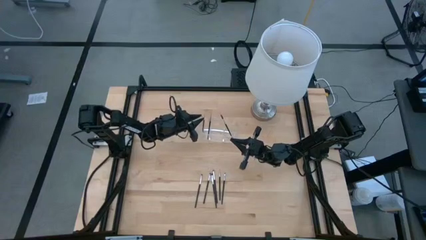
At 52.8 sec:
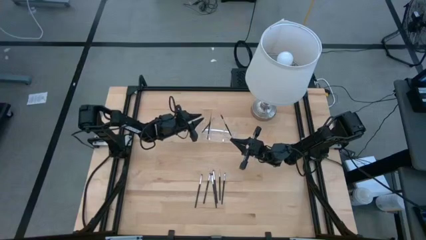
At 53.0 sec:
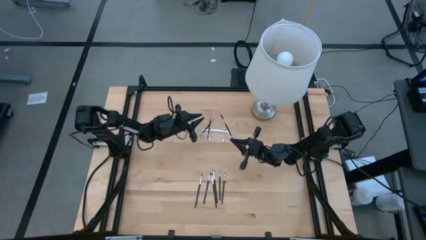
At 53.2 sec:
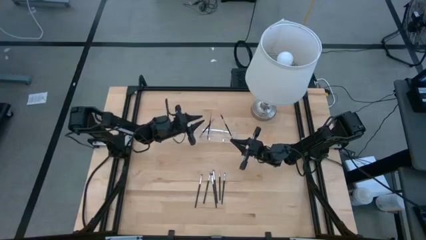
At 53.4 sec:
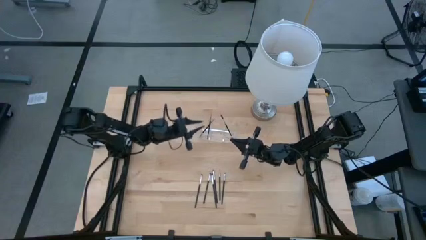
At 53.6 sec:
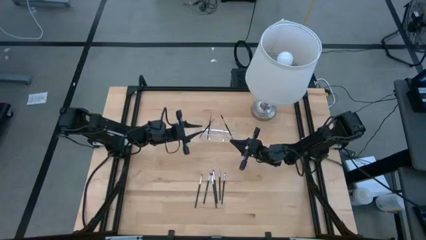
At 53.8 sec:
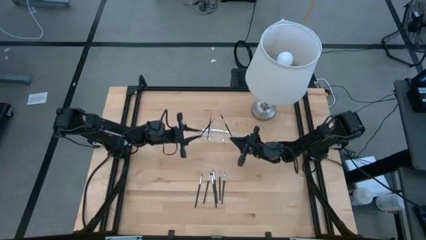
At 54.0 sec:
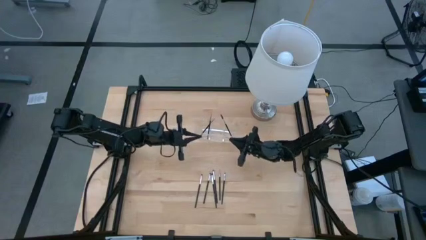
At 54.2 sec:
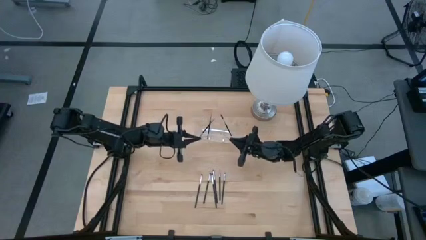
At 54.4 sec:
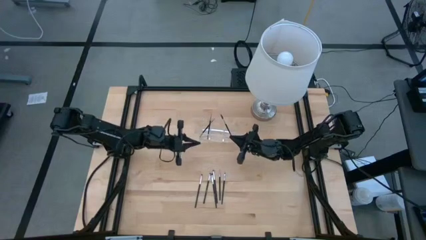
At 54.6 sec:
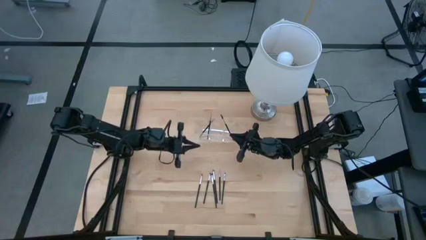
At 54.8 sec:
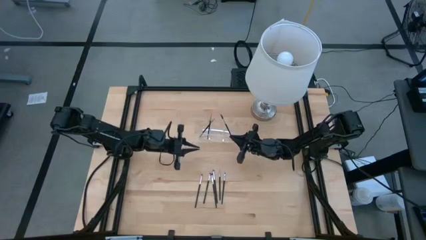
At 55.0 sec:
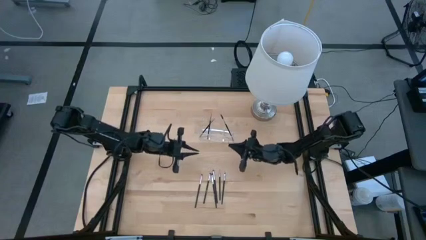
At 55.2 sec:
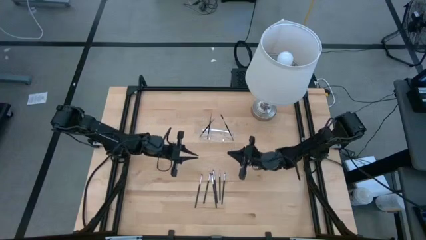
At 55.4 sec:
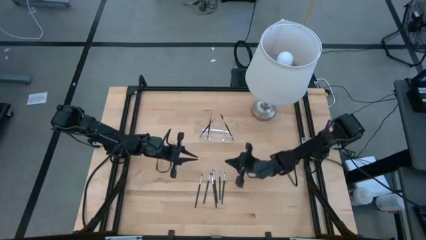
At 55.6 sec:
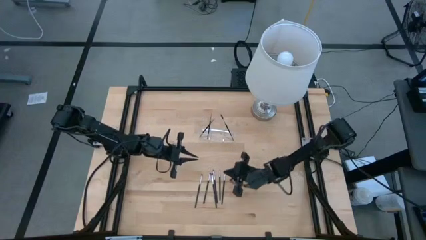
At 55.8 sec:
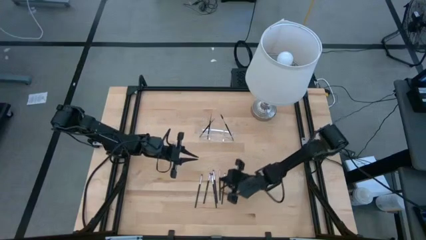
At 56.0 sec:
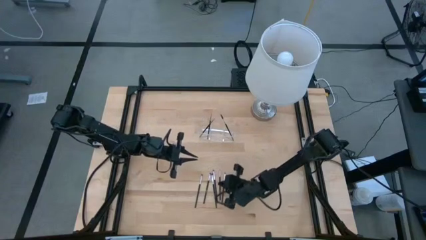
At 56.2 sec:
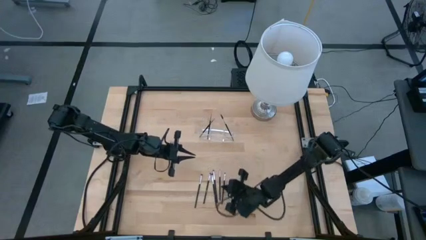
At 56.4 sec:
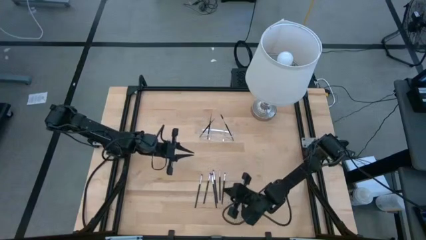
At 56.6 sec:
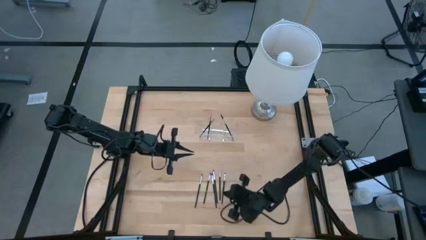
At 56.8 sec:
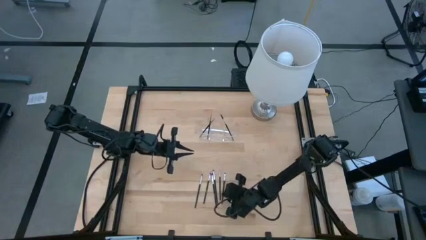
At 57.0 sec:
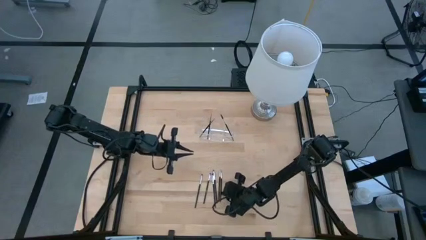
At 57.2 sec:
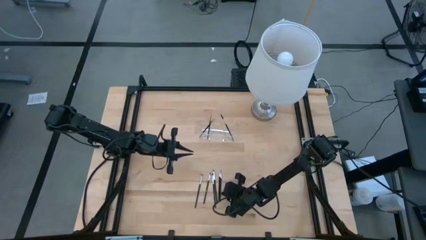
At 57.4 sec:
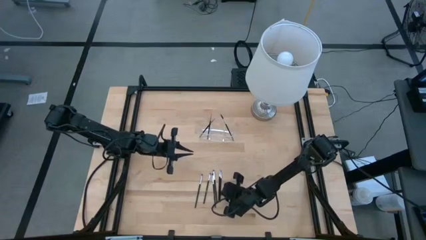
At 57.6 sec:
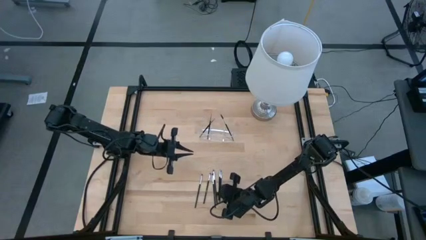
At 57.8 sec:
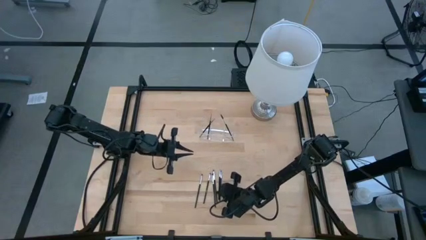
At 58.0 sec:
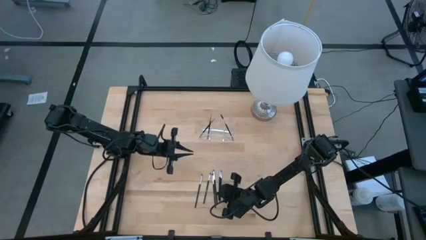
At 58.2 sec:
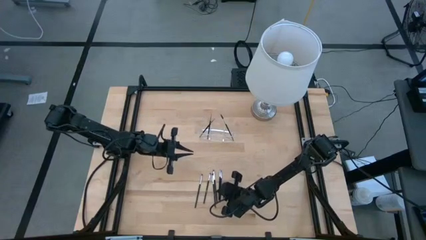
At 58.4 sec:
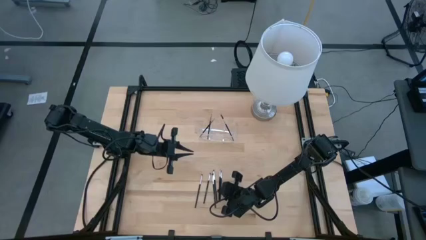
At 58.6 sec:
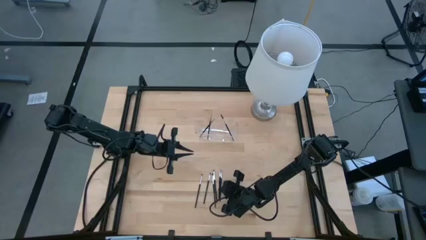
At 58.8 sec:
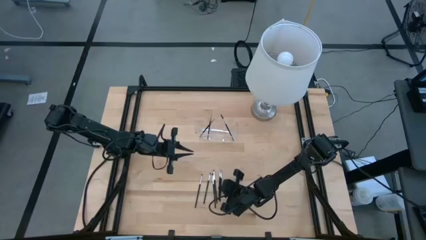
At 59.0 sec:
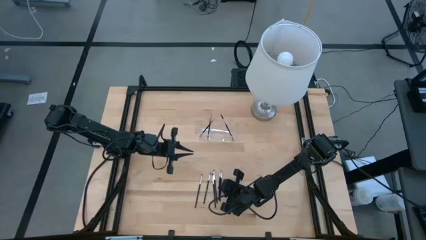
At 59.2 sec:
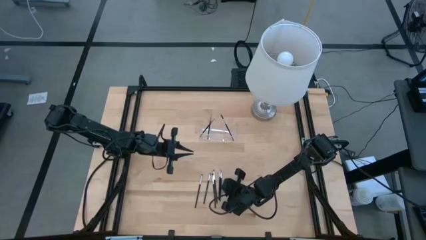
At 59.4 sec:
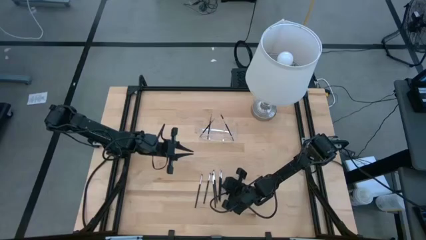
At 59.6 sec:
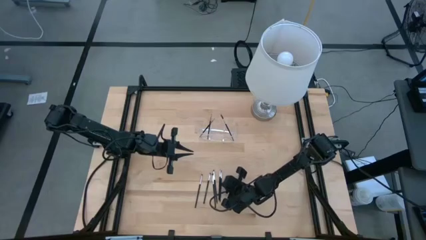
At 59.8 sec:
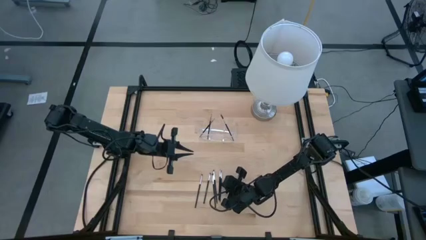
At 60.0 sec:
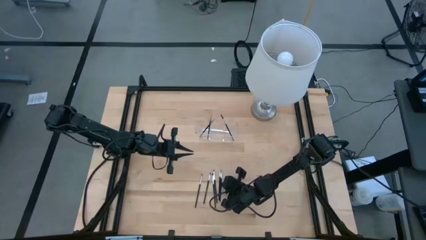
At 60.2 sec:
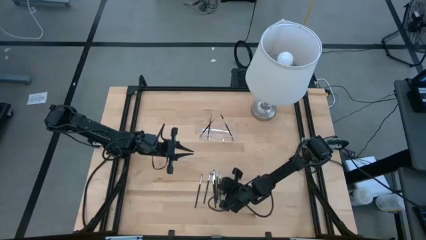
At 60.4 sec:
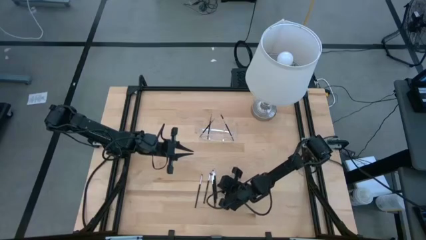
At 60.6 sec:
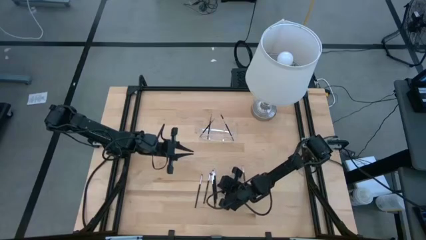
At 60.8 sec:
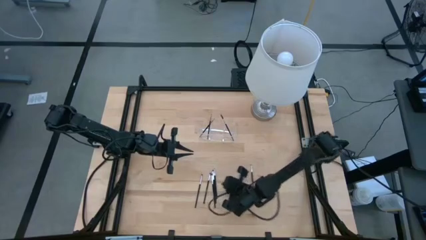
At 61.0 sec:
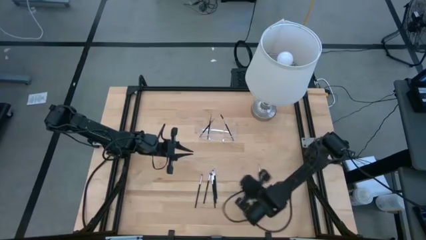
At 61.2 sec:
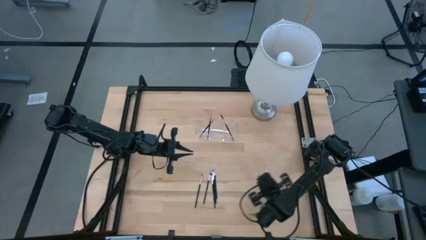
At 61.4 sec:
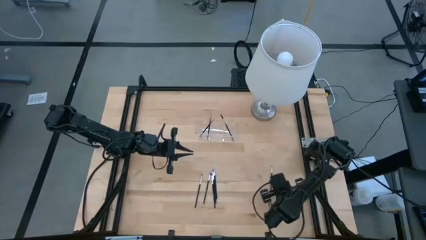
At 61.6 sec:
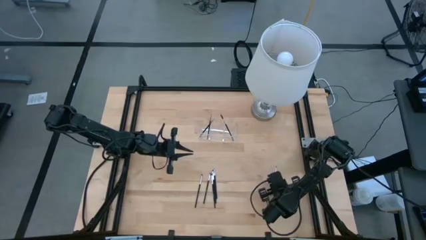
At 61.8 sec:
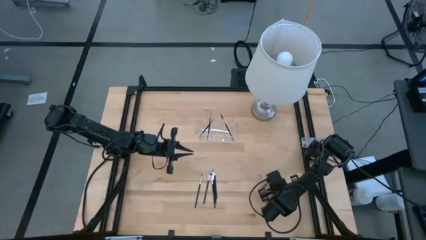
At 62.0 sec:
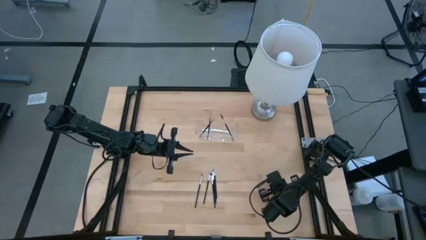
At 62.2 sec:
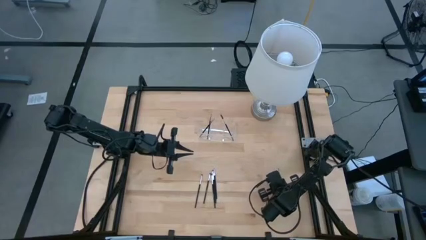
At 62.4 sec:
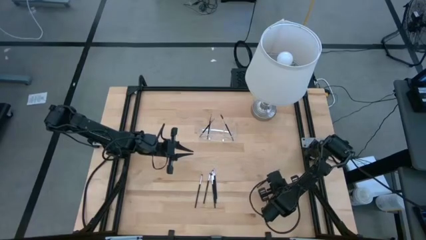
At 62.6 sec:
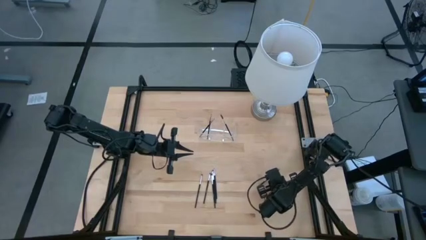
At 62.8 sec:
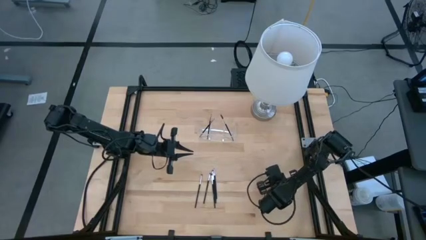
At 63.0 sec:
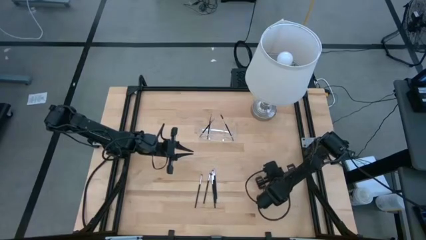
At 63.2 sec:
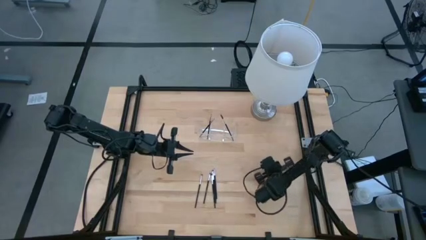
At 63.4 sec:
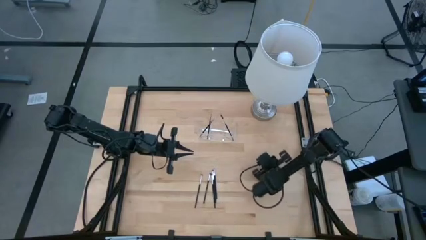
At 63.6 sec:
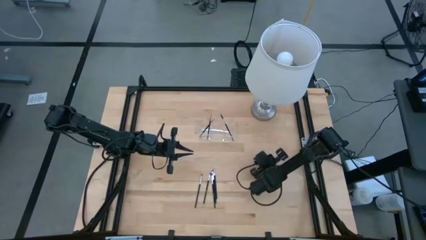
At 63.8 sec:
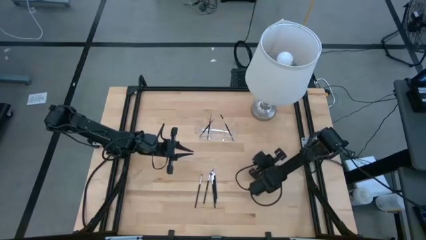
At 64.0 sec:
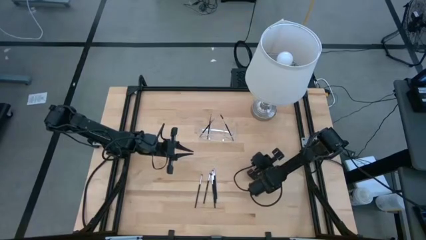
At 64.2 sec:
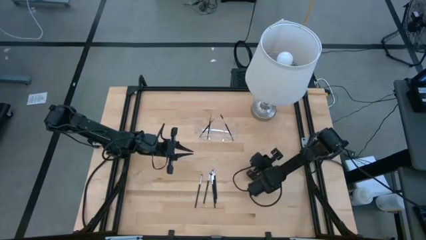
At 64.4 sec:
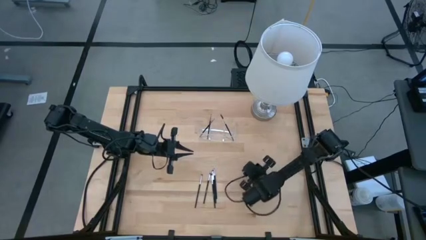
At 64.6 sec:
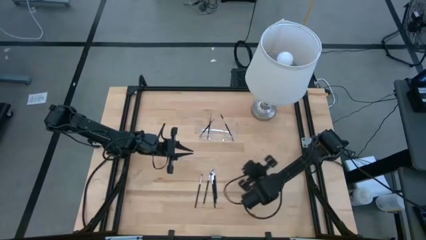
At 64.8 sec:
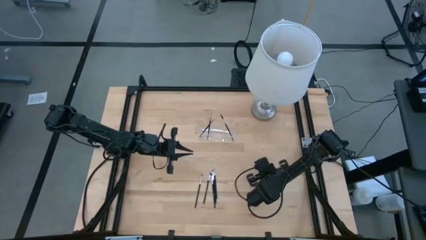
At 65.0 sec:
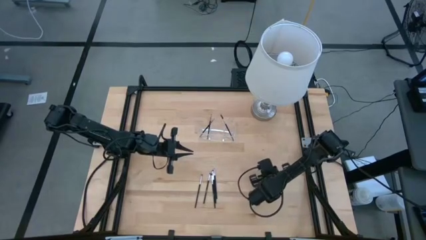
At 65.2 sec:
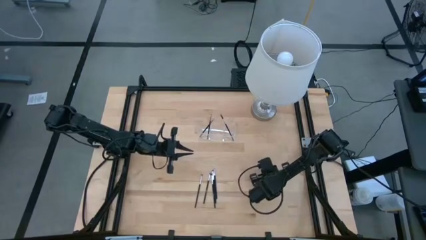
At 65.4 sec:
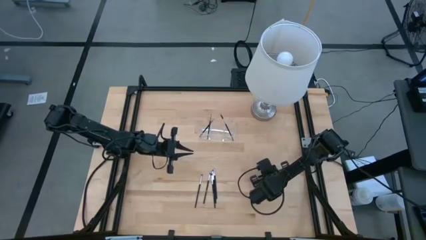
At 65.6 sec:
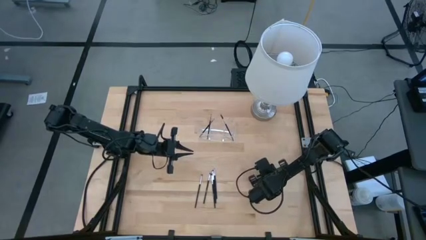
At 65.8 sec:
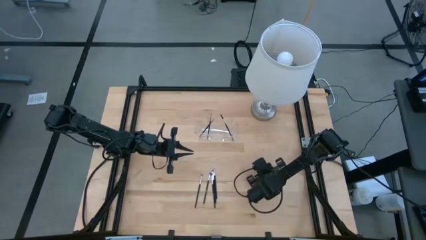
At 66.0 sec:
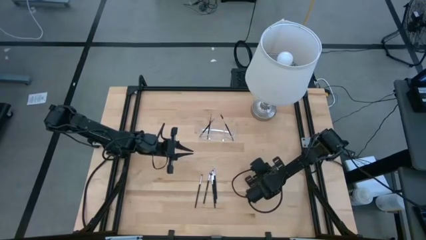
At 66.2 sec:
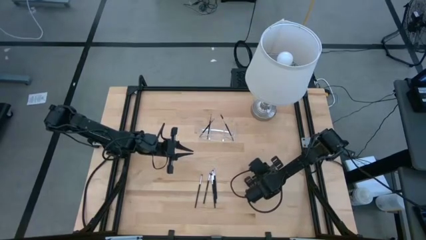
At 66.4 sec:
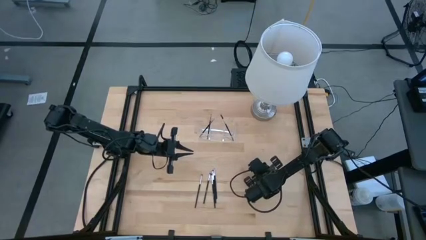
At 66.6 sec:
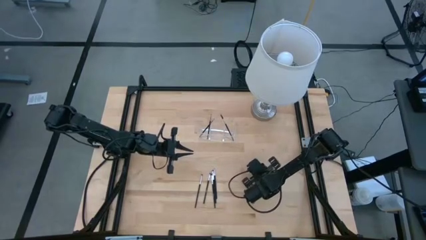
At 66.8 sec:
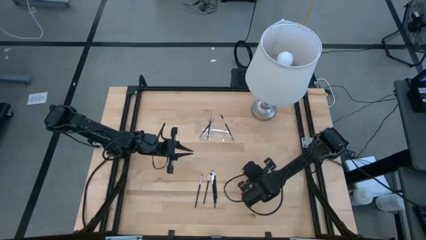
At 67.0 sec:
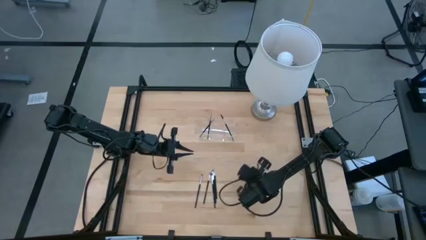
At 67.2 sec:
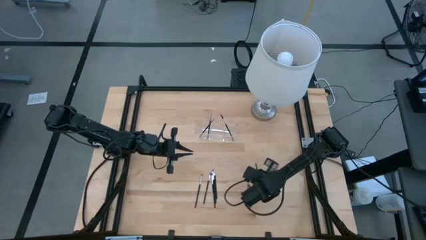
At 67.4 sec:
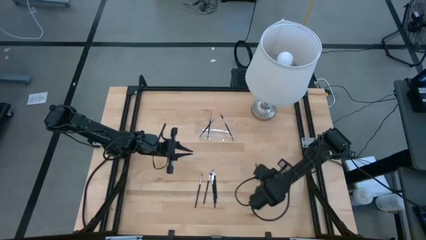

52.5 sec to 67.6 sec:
Task: Put items in baskets/containers
Put the black liner brush transparent organizer
